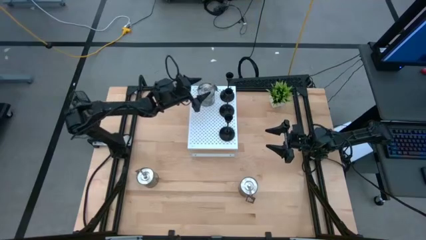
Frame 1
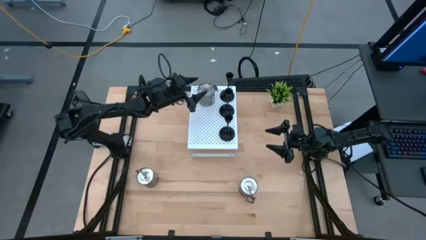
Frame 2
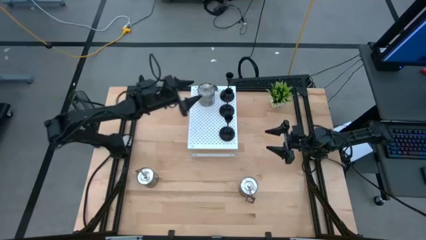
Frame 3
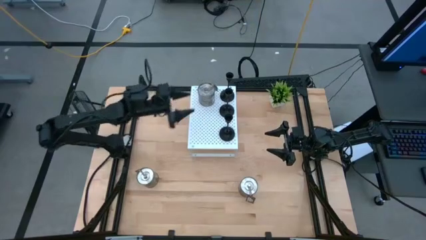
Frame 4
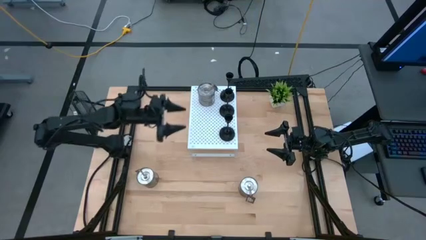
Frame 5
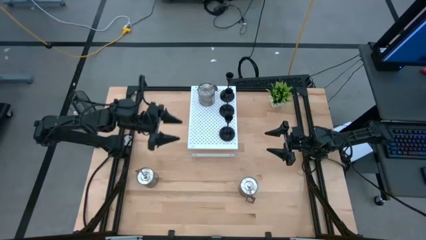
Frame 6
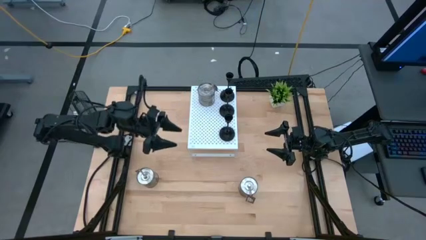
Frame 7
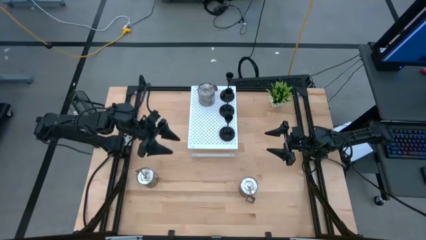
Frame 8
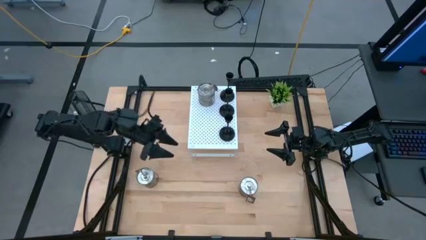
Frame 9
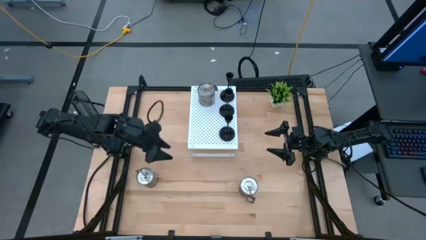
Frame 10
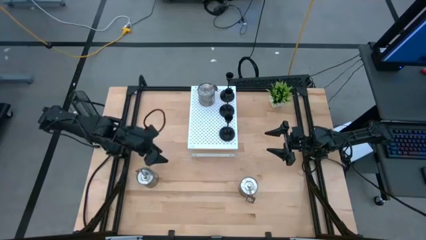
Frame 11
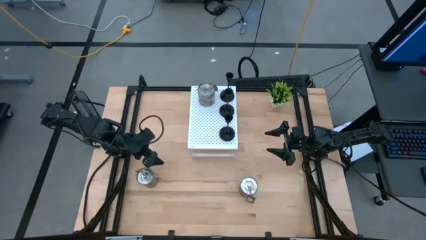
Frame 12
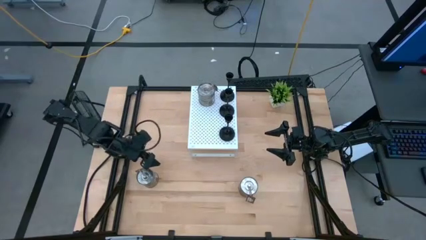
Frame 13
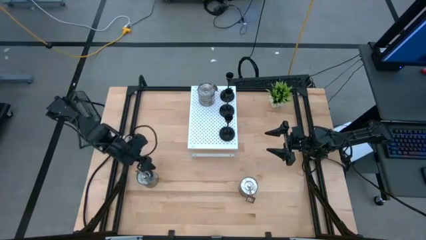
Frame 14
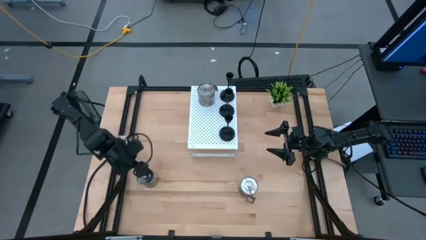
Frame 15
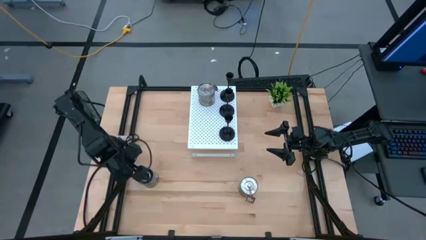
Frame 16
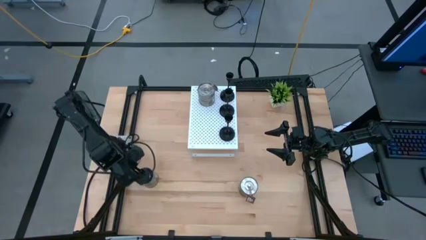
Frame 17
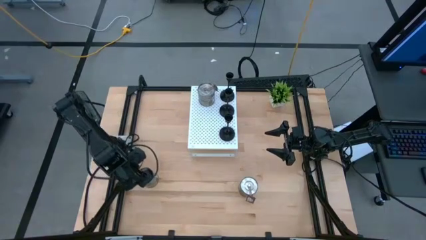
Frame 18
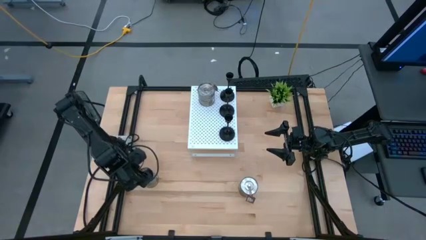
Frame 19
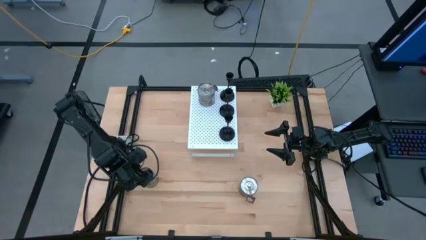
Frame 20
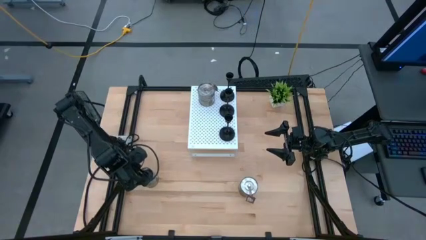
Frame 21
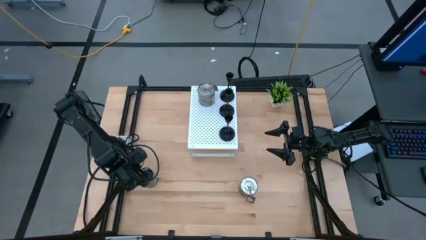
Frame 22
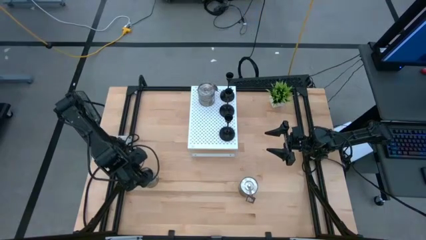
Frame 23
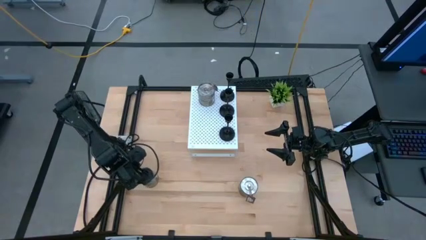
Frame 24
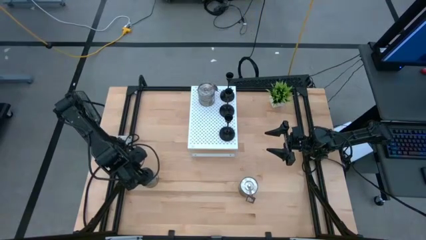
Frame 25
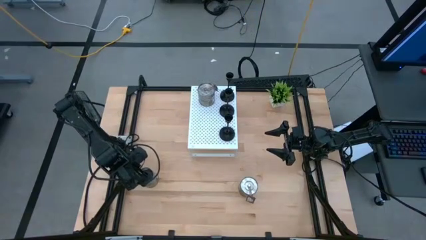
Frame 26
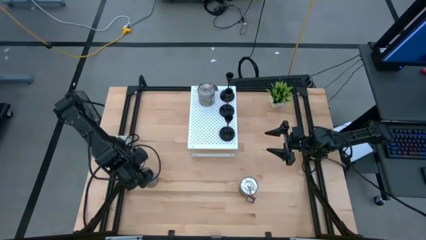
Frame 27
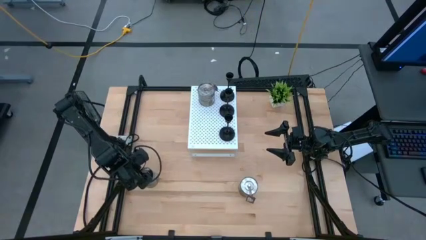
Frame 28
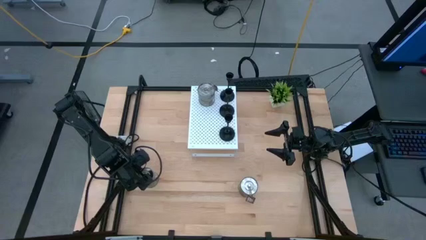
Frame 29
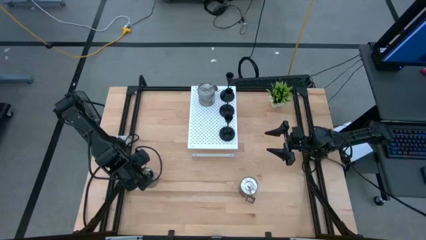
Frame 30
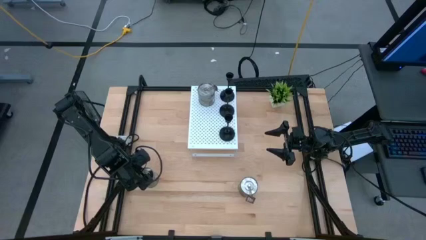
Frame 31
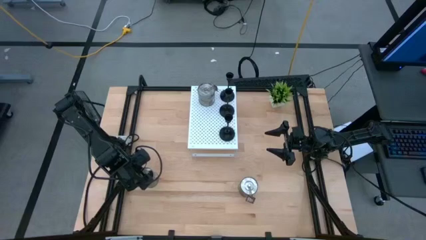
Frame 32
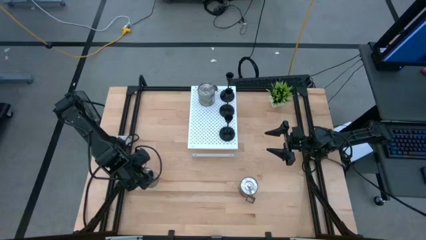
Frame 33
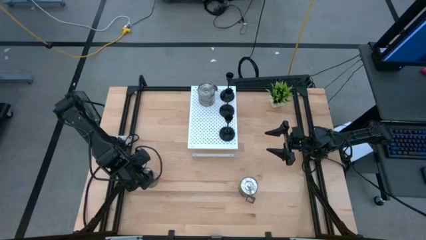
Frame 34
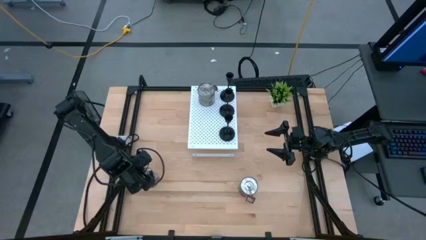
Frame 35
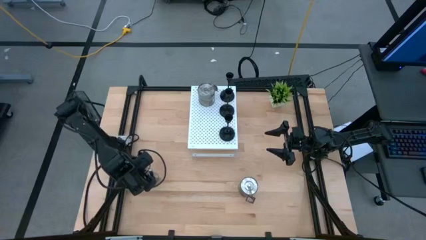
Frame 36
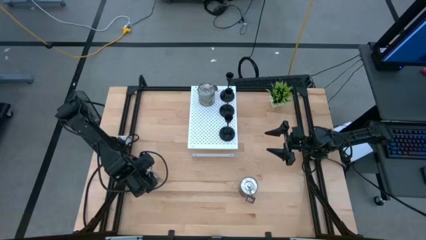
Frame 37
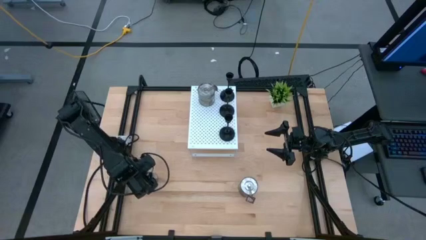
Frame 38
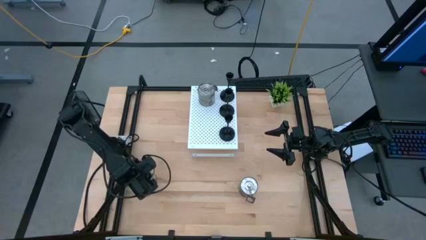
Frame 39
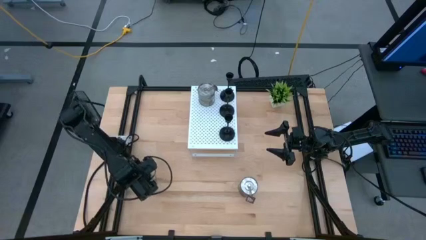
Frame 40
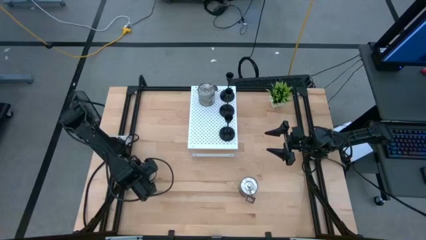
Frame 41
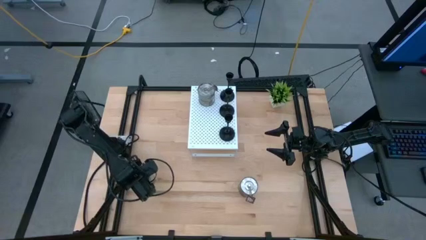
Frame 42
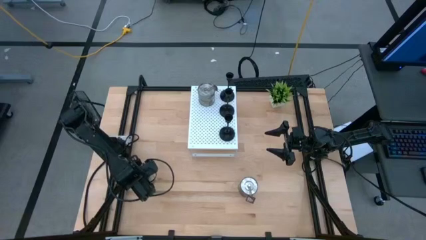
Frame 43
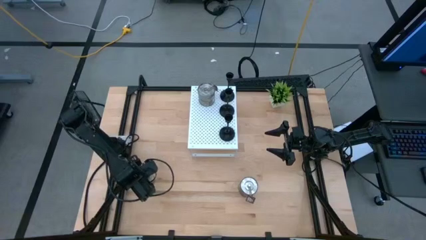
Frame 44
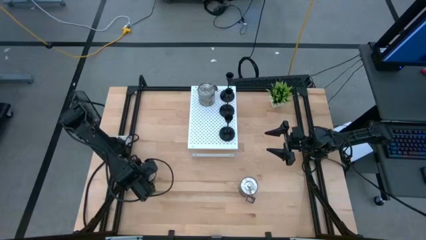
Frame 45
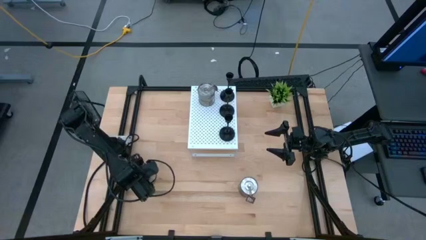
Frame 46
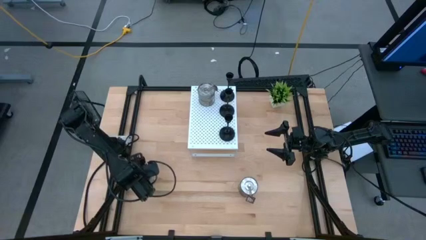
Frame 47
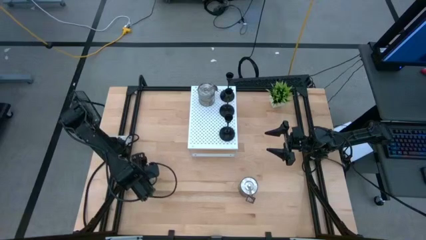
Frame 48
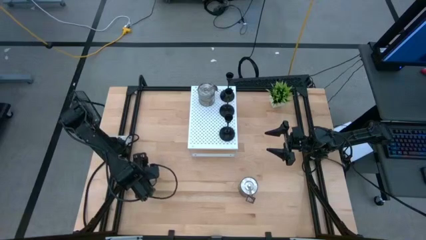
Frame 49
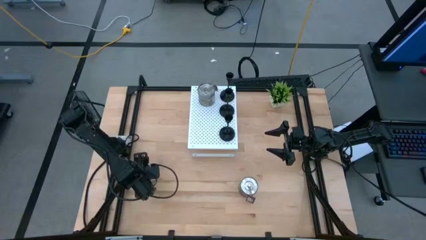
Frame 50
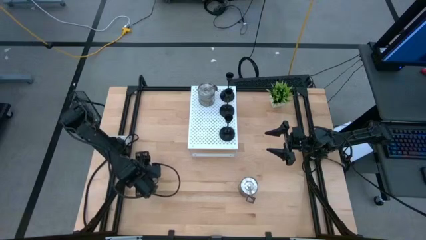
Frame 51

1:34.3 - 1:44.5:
Task: Pick & Place candle stick holders
Put the left silver scented candle on the shelf aligned with the other silver scented candle

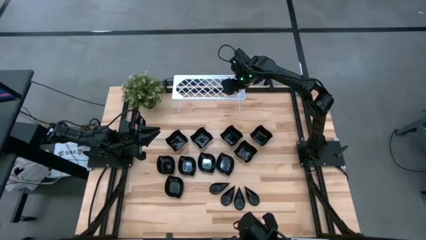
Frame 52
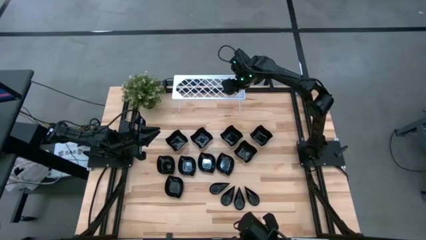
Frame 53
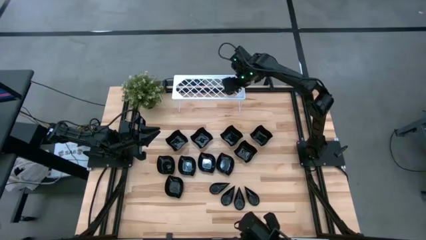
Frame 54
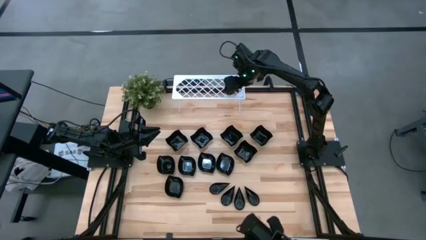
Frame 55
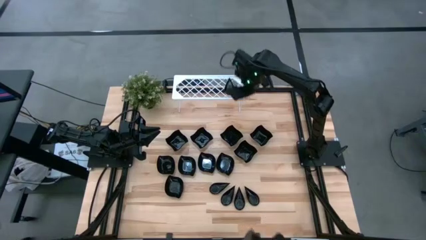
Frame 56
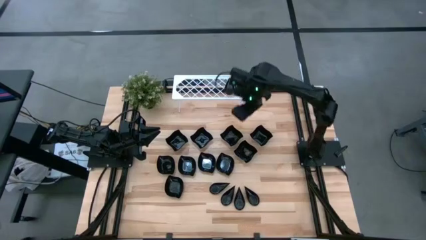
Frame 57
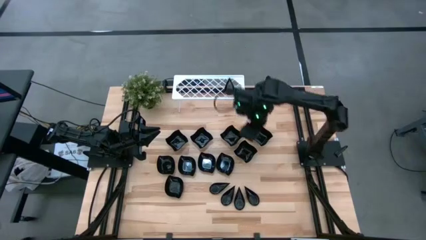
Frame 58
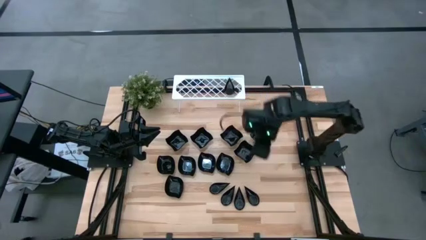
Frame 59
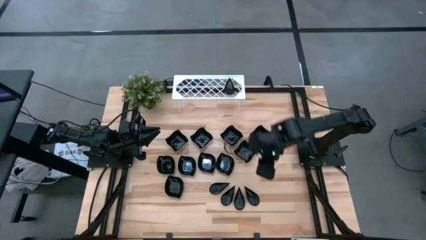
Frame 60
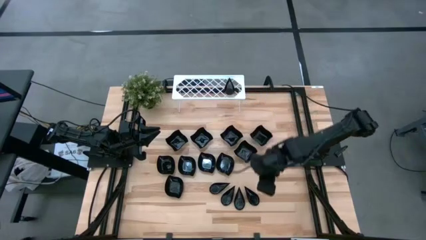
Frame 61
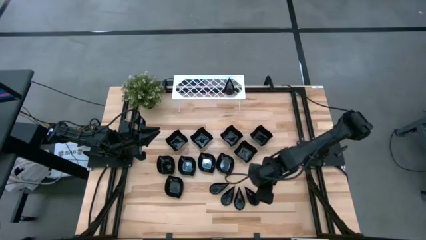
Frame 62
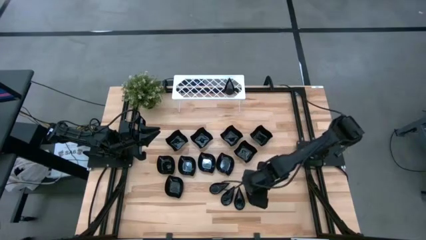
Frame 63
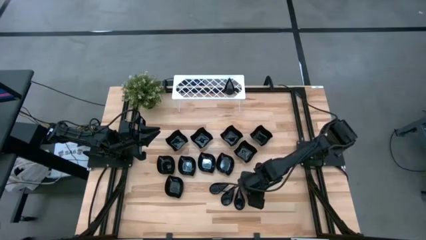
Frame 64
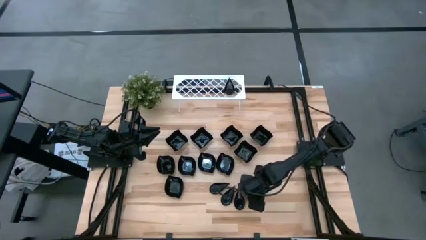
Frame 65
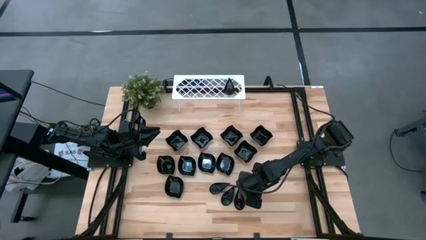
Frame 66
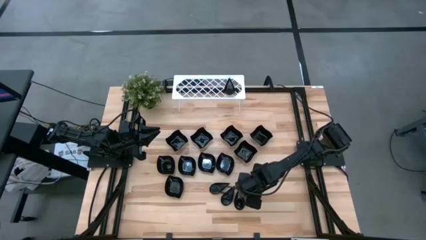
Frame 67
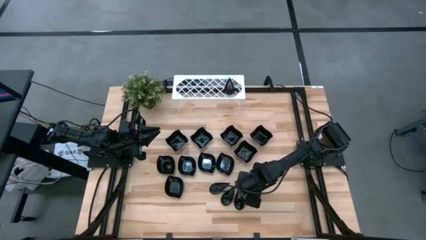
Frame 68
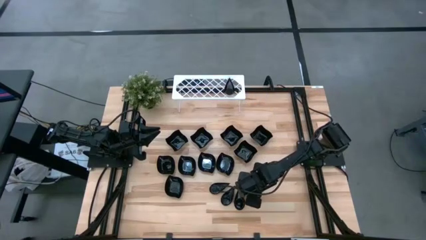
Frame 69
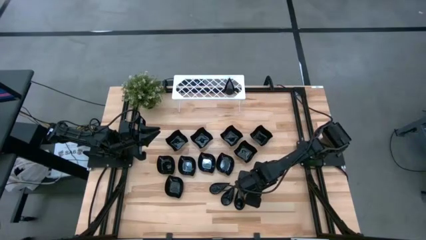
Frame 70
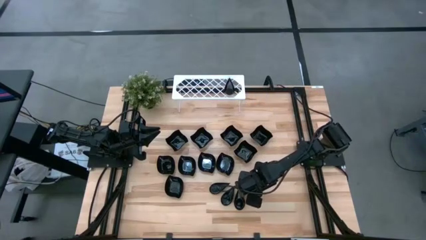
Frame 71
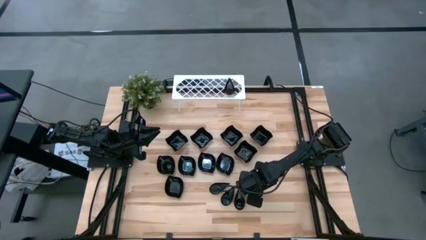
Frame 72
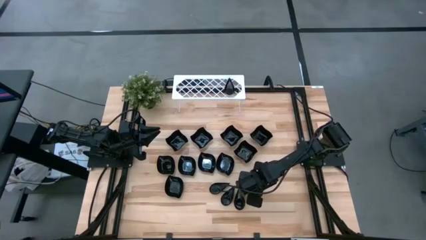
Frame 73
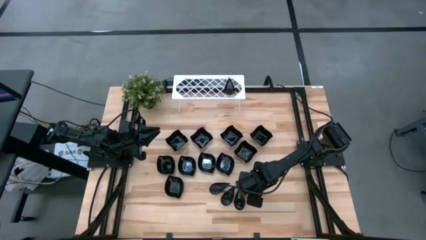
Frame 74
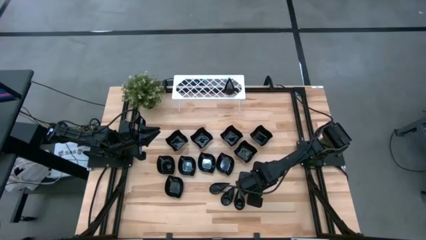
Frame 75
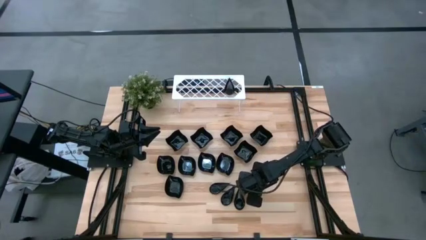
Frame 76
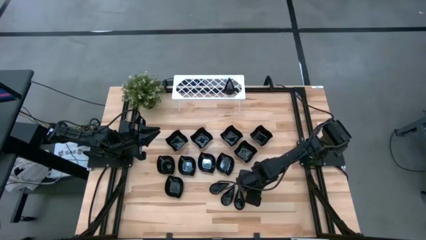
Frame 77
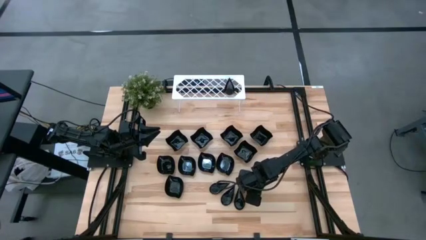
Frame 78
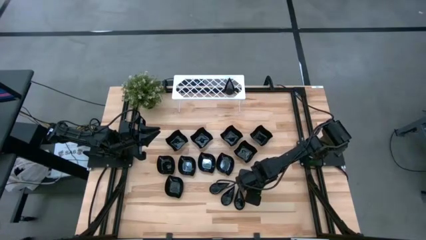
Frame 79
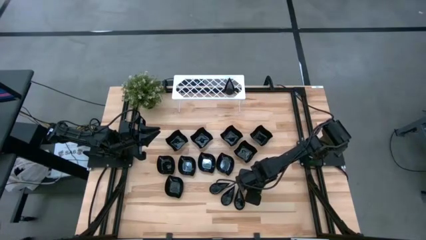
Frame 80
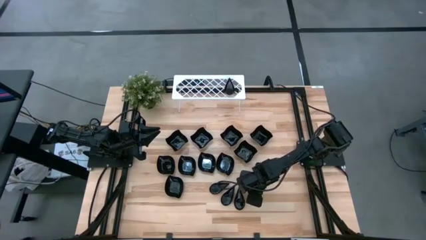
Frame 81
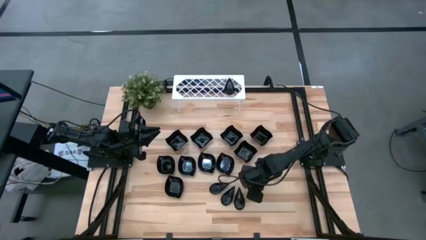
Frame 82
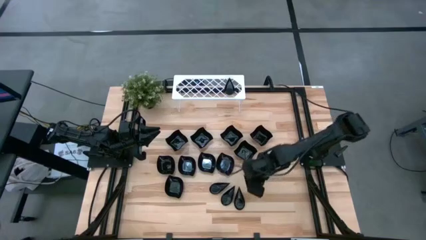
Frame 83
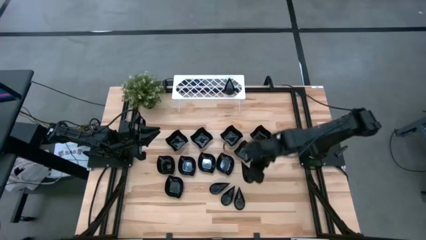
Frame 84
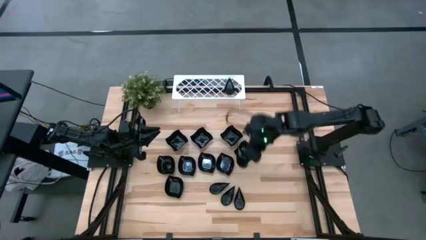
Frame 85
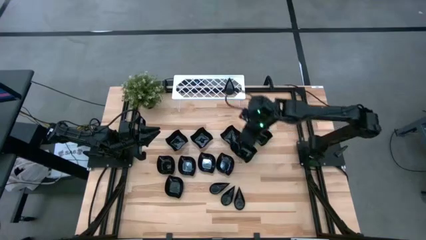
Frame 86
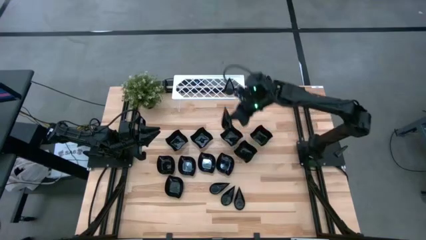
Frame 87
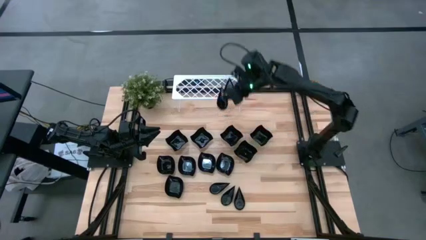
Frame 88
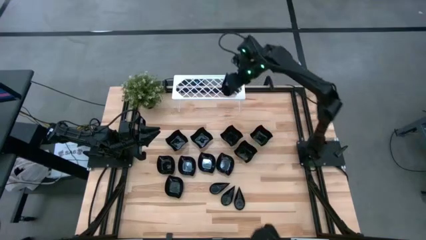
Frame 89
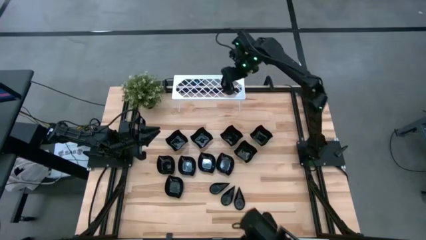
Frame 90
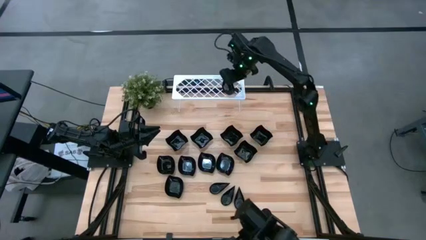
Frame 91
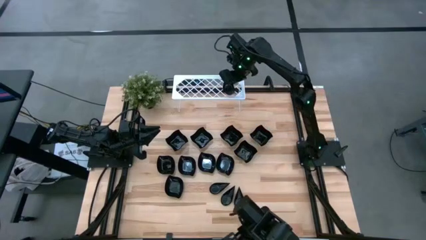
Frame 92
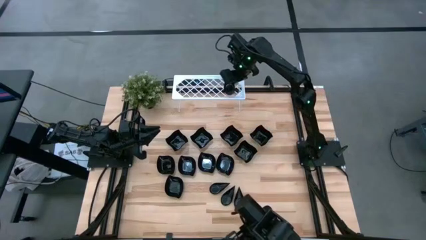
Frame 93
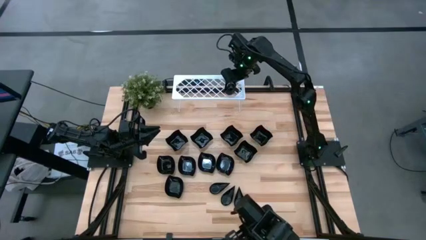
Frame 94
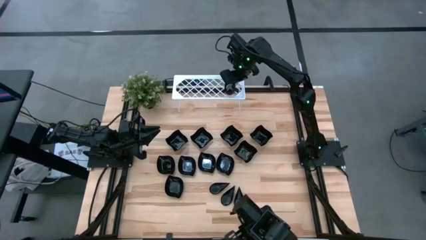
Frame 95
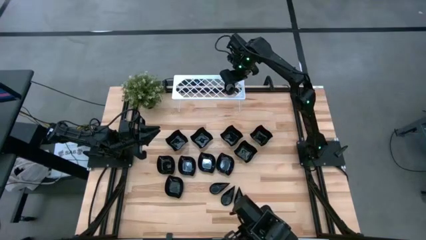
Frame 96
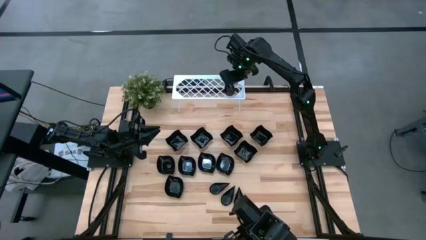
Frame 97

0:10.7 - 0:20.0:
Task: Pick & Place Mini shaped plates
Stack the drop-shaped plate on top of the drop-shaped plate on the shelf
